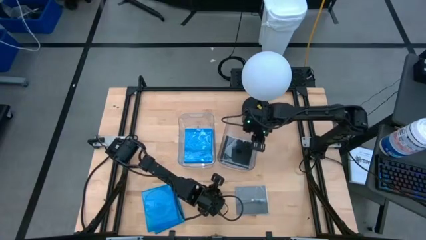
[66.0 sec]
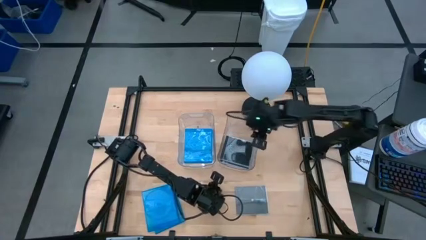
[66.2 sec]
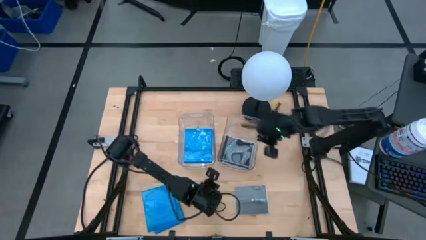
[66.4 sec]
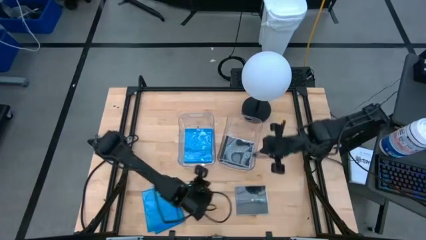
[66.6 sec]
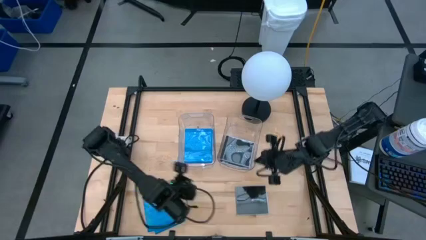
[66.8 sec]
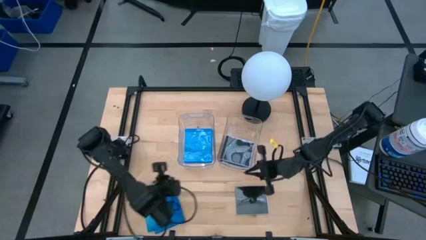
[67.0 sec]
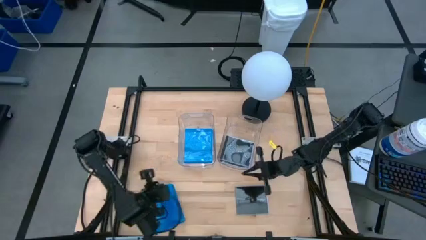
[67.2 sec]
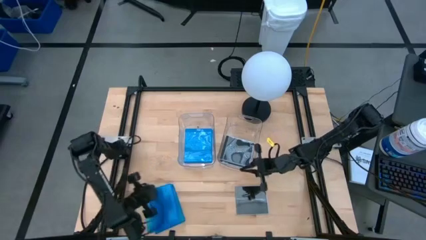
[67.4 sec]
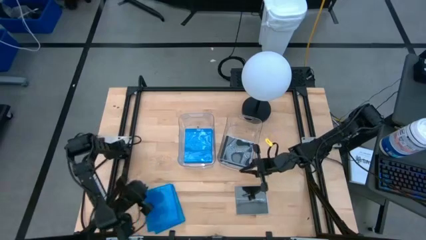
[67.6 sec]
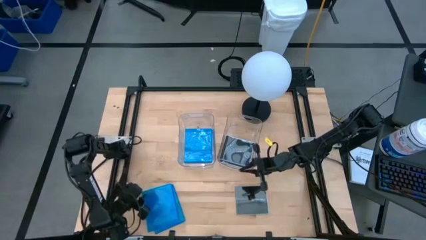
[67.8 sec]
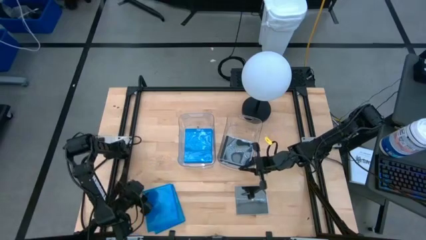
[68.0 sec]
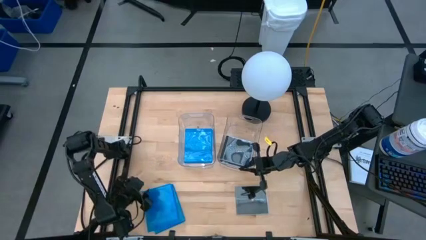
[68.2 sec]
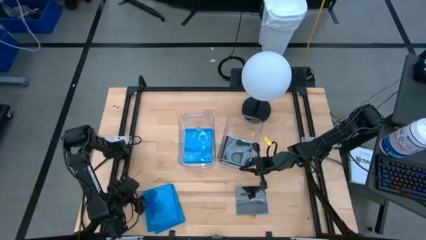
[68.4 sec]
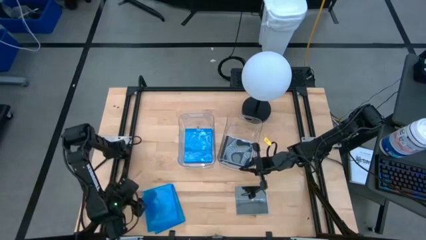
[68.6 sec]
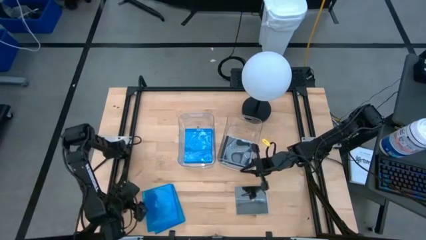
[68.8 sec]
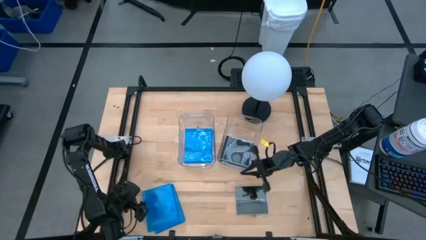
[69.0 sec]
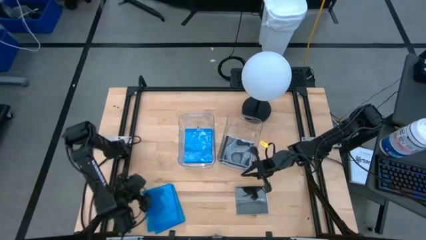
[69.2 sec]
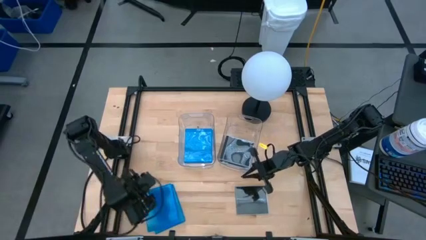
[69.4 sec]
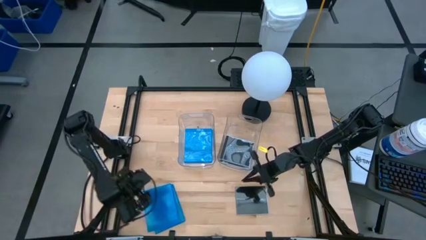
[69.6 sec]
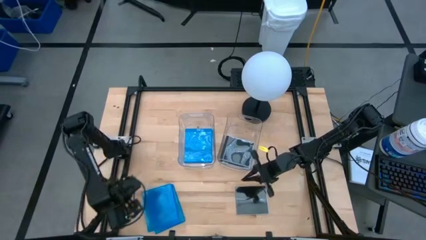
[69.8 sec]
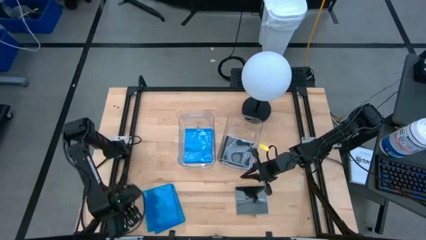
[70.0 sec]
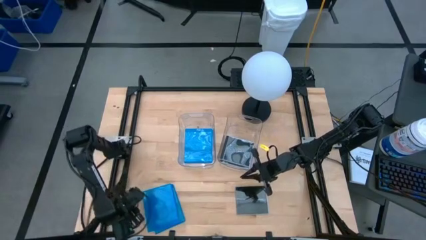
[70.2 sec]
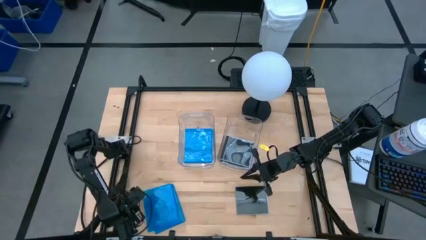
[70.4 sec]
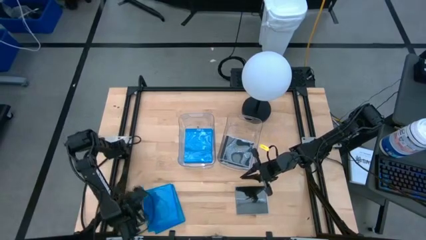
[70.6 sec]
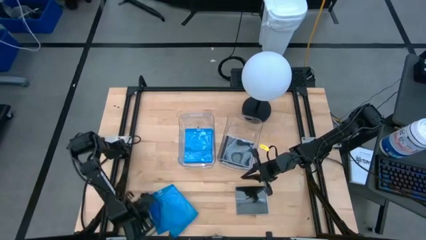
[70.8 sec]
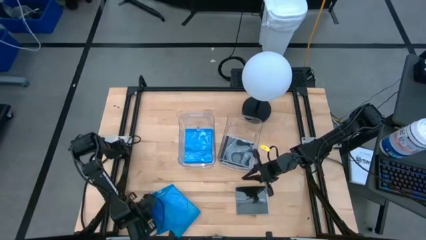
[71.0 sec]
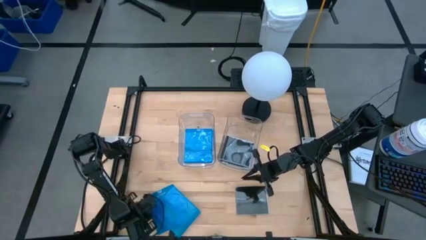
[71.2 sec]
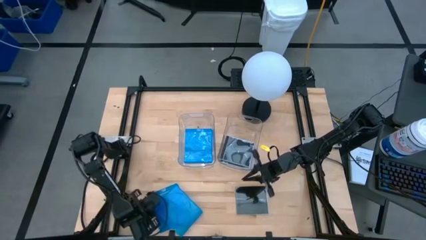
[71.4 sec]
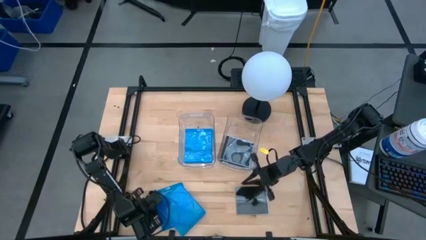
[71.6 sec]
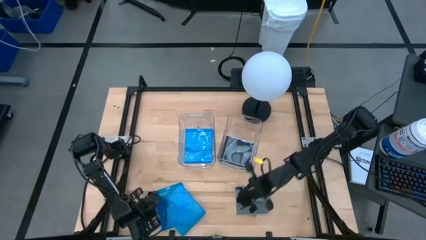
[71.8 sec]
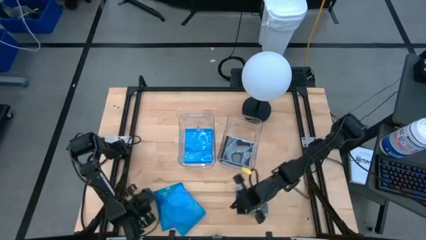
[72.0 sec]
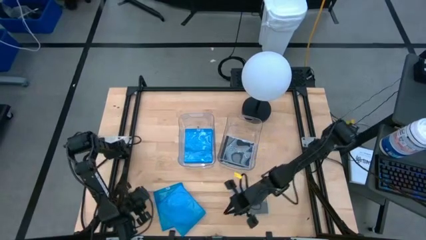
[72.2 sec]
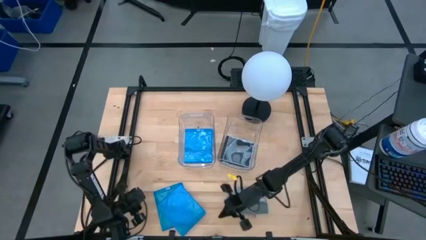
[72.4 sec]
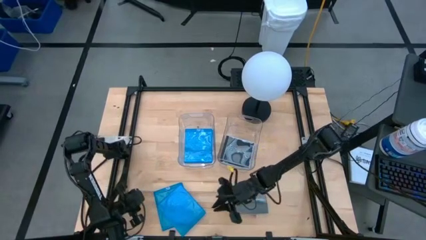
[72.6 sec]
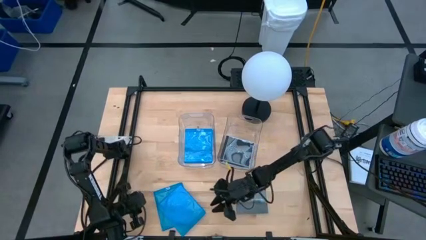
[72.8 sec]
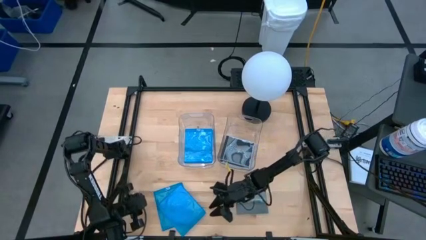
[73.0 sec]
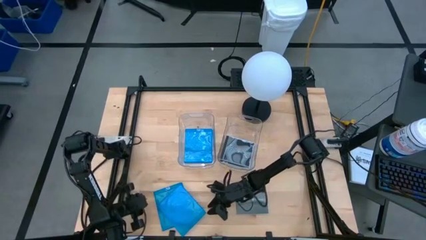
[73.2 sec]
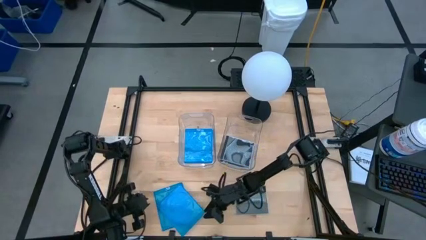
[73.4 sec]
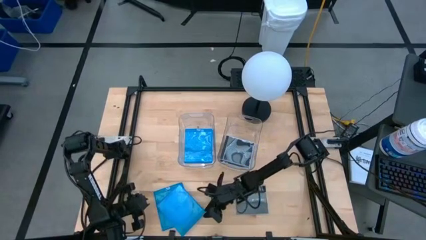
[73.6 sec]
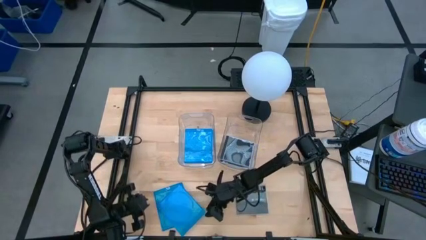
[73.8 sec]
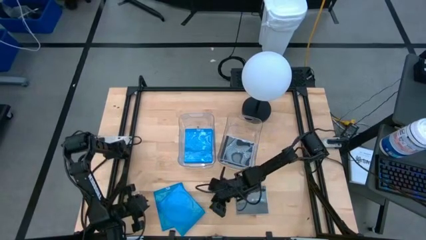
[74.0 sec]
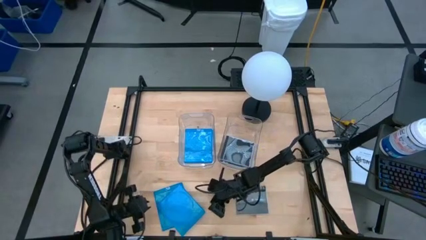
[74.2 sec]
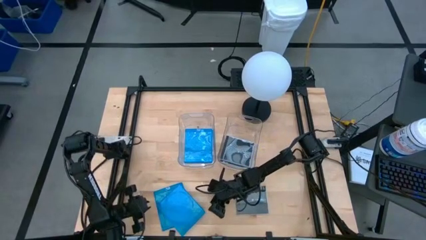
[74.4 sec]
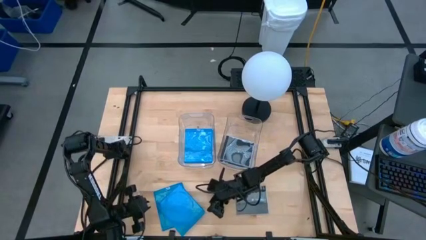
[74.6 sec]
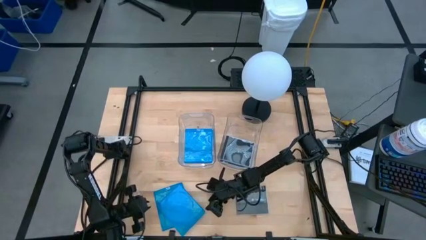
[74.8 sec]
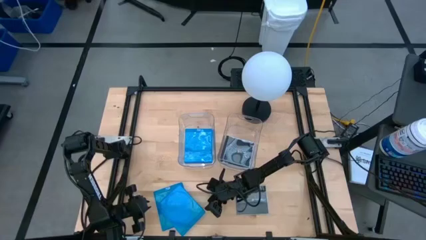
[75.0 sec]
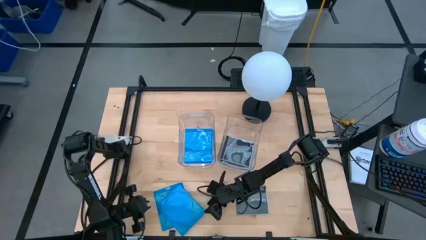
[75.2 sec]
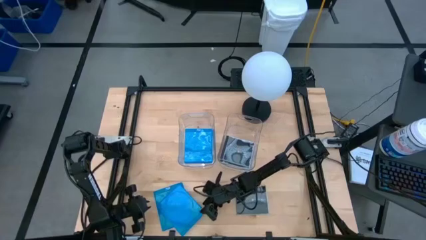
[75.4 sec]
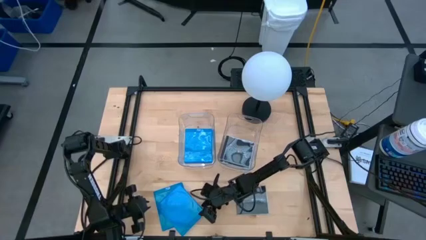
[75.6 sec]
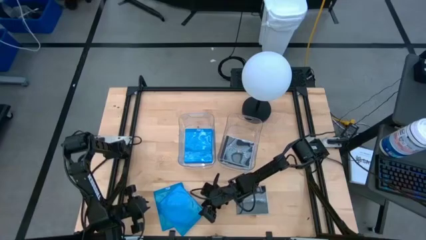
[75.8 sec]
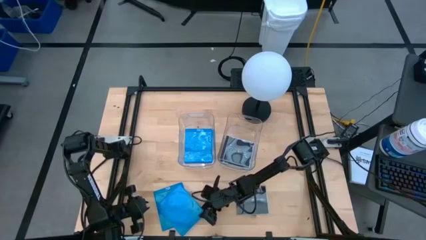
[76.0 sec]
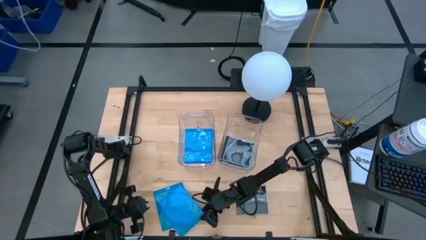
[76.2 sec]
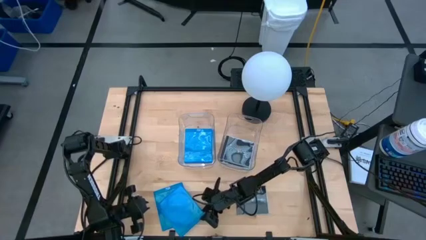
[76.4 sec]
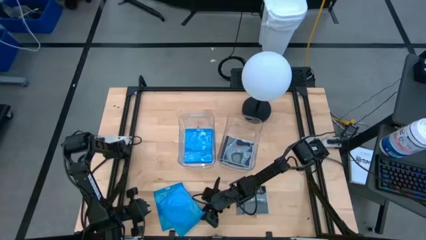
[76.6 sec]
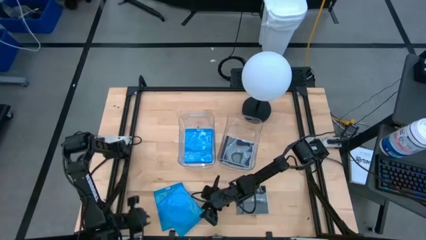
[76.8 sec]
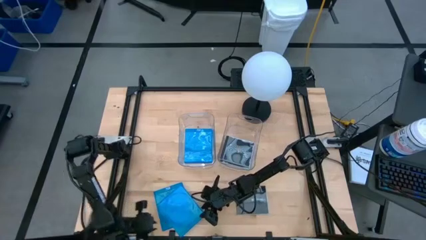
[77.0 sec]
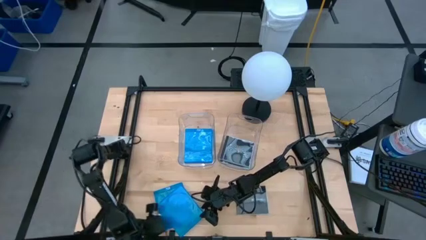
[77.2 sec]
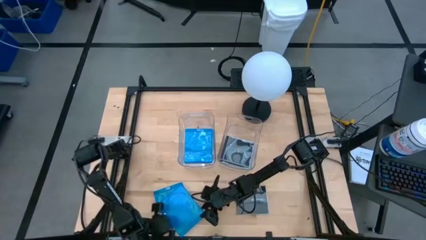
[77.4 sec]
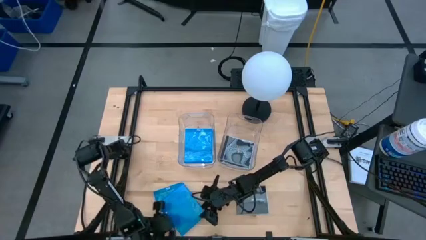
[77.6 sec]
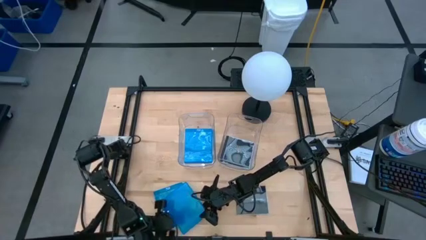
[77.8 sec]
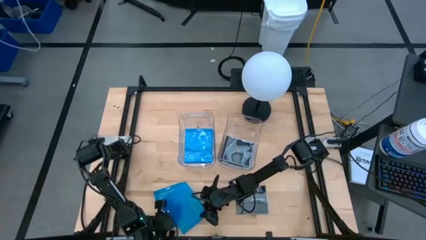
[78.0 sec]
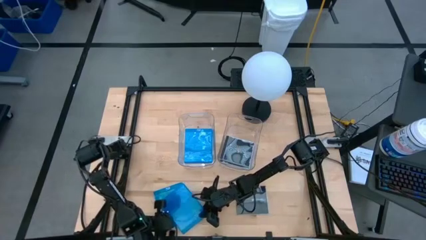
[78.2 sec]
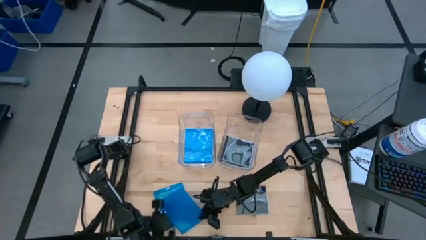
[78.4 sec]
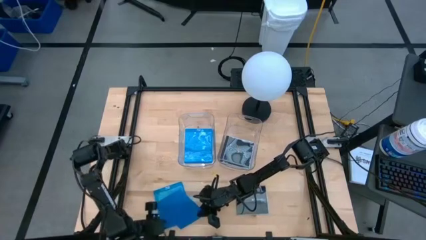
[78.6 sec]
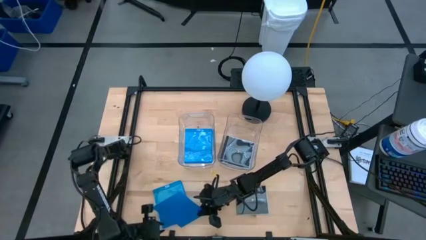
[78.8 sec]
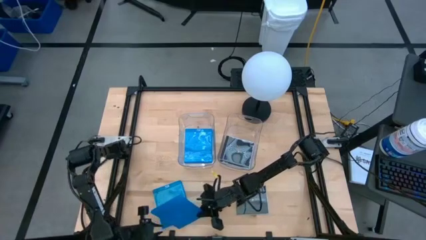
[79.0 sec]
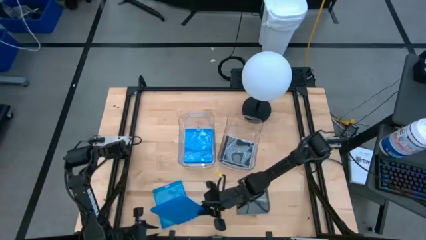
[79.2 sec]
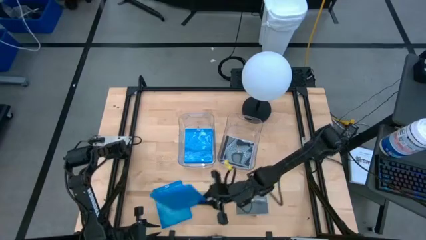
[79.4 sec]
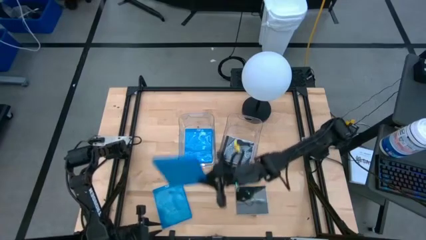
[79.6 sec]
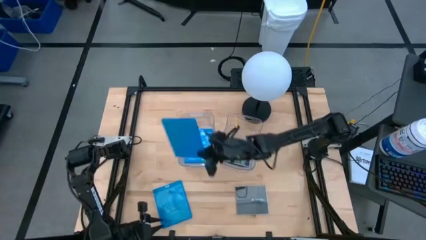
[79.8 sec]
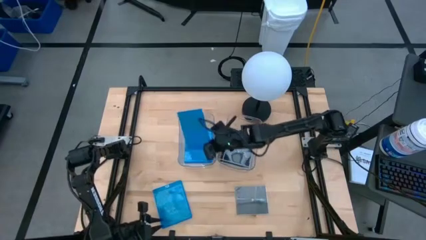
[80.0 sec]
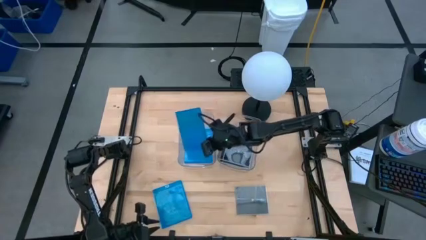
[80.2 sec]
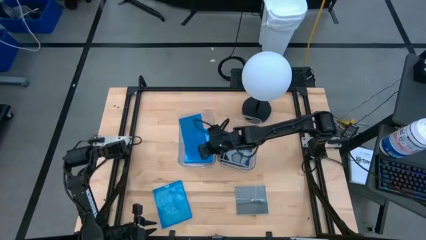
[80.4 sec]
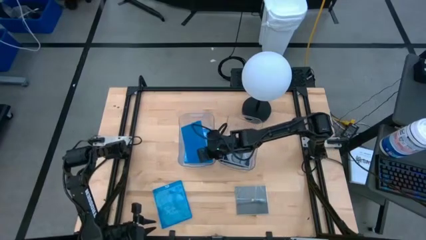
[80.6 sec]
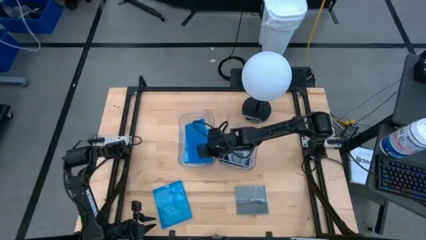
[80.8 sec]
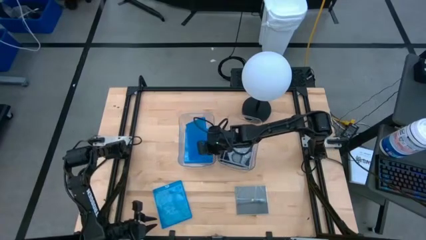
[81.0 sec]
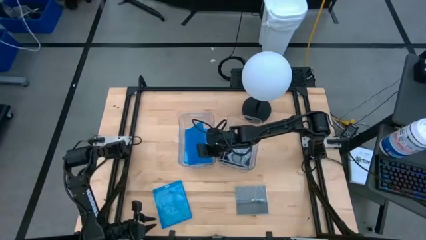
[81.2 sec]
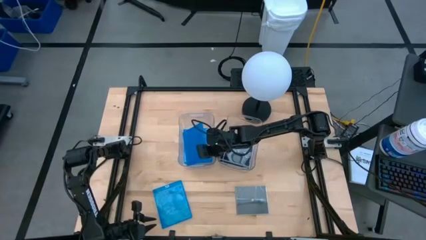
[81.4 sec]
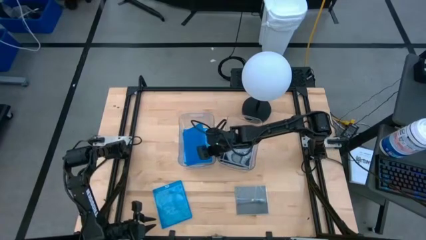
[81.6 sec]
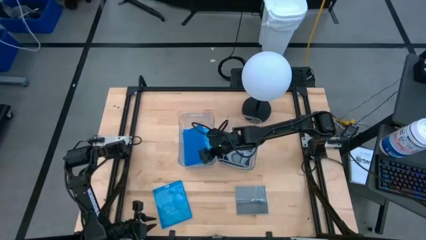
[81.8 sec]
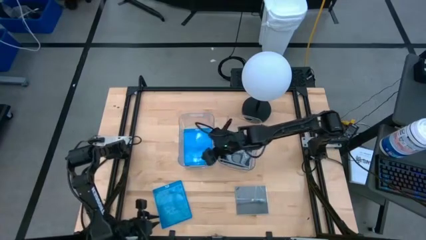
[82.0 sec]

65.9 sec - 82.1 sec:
Task: Pick & place jewel cases by type
Put the blue cd case into the left transparent bin
